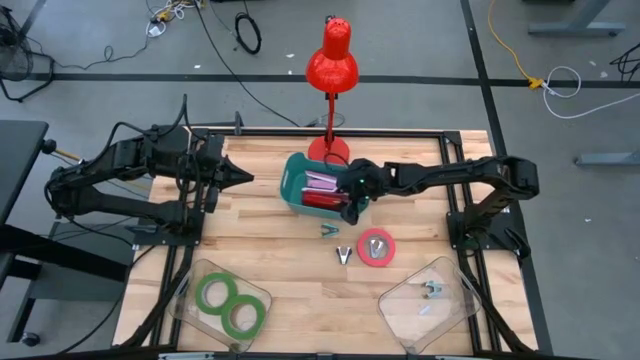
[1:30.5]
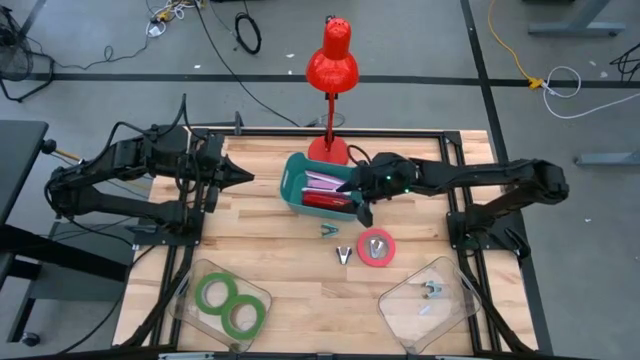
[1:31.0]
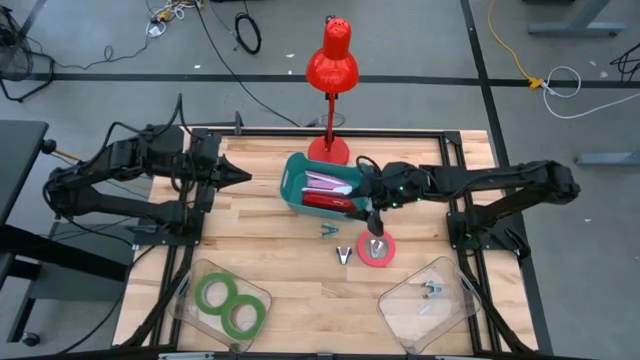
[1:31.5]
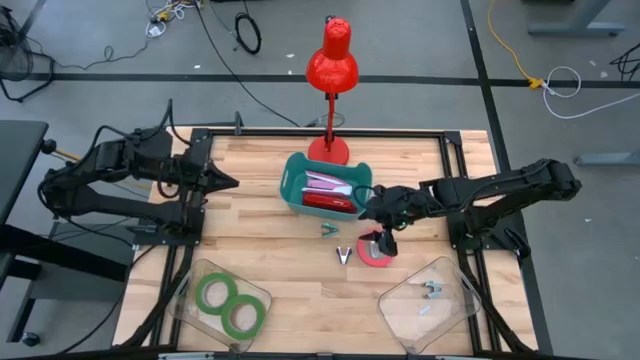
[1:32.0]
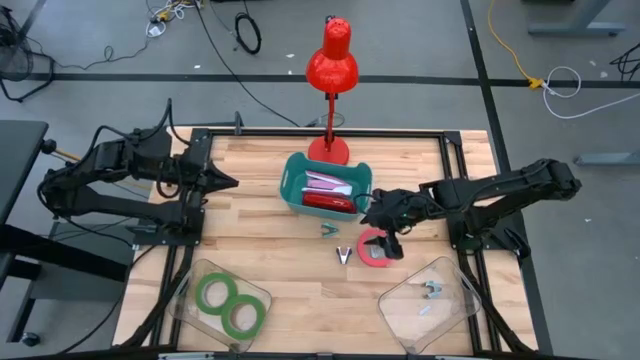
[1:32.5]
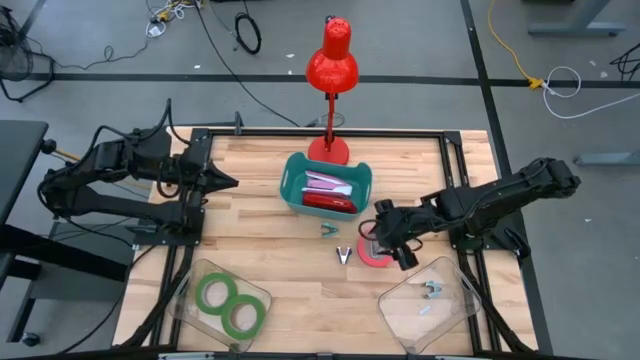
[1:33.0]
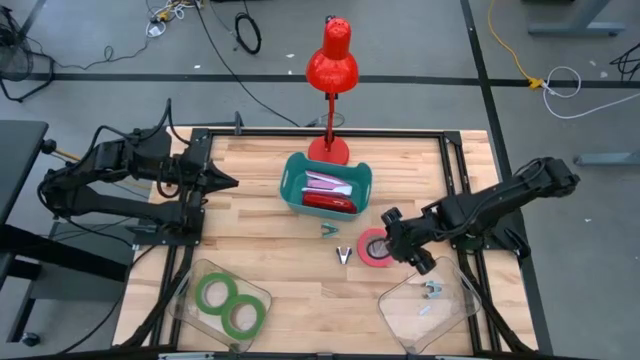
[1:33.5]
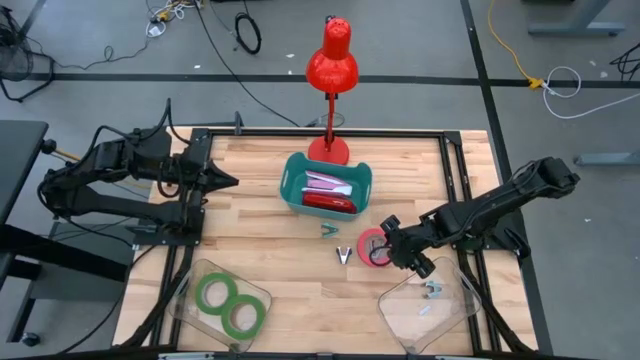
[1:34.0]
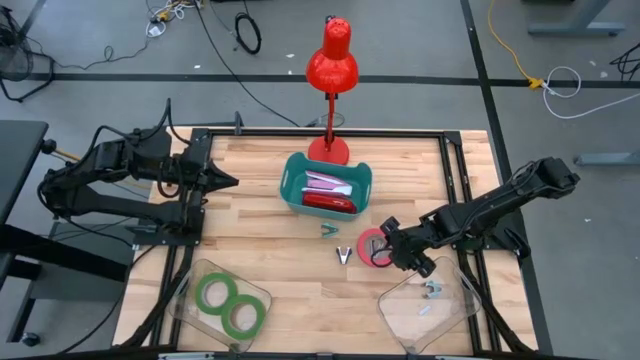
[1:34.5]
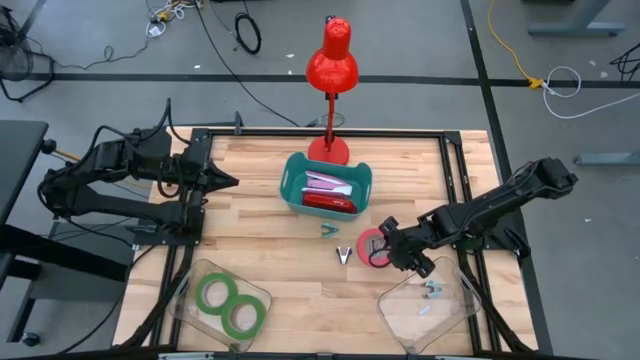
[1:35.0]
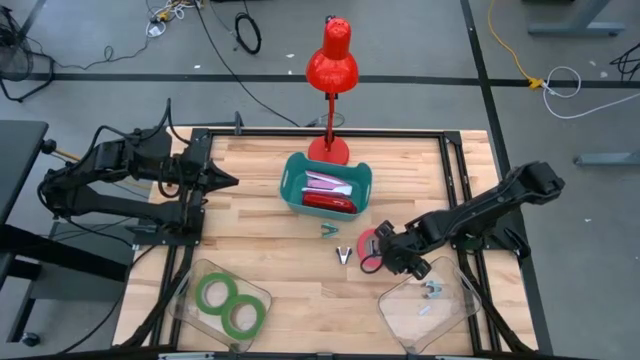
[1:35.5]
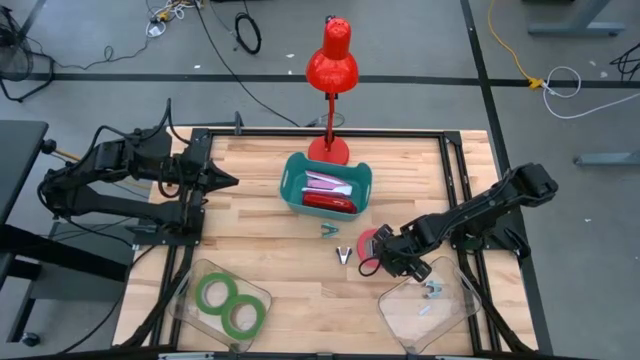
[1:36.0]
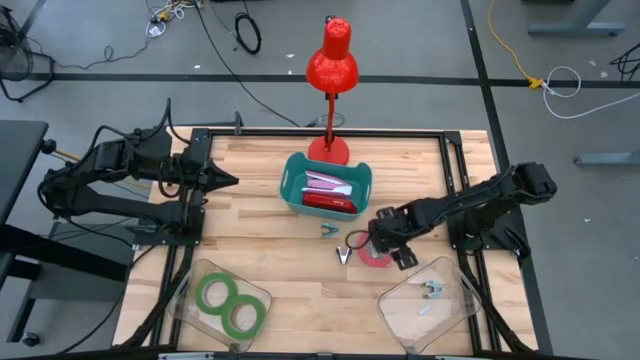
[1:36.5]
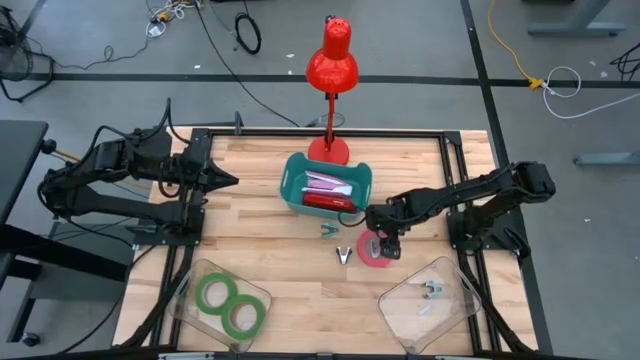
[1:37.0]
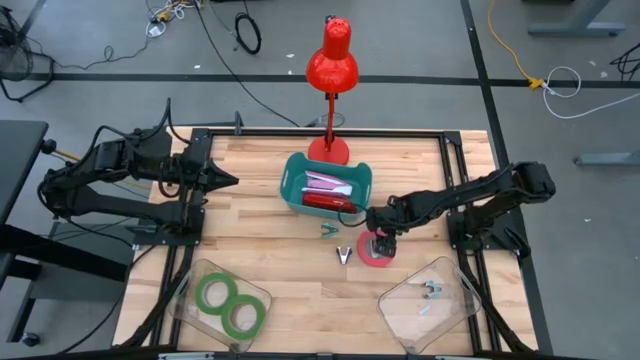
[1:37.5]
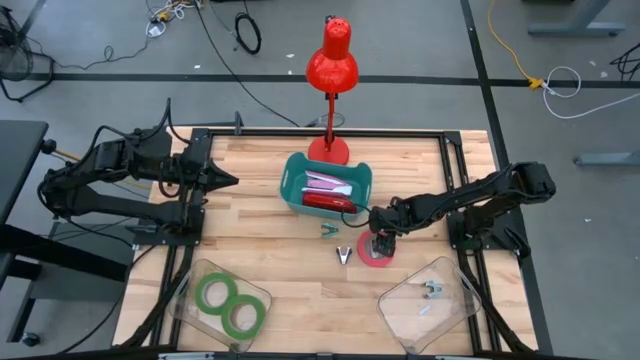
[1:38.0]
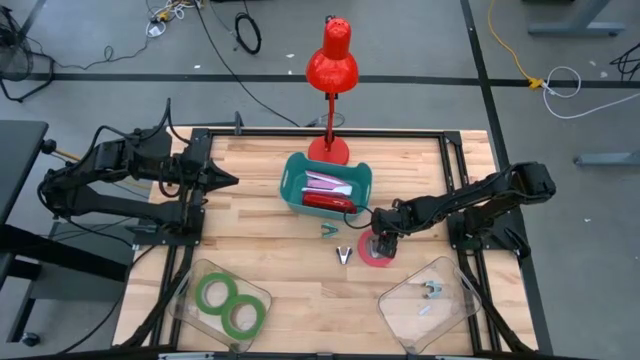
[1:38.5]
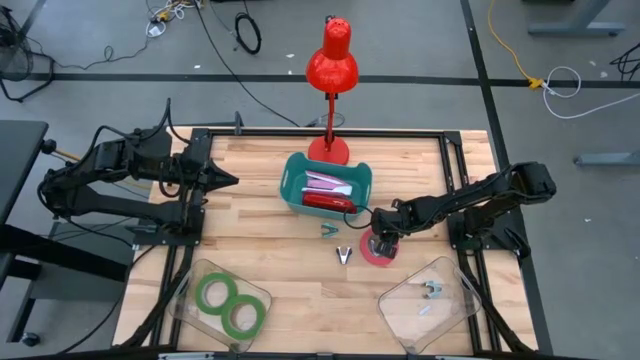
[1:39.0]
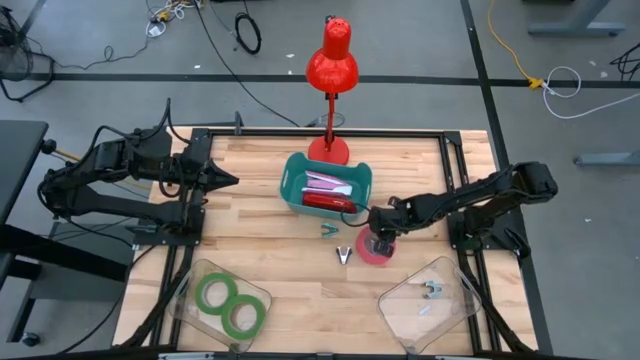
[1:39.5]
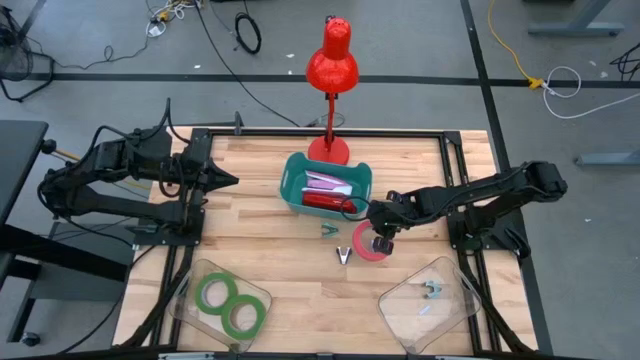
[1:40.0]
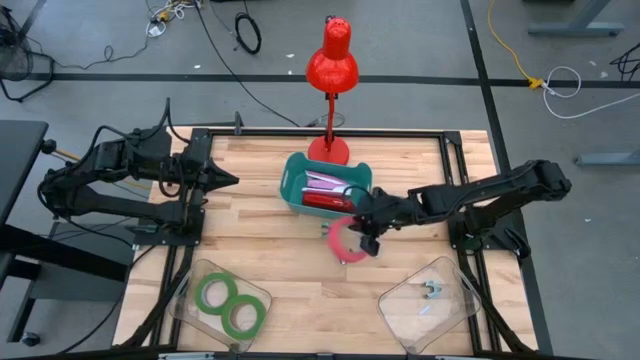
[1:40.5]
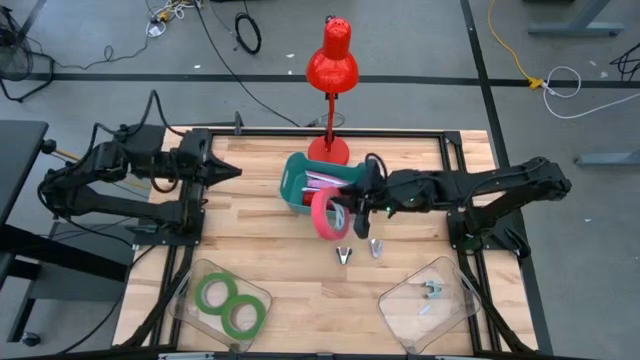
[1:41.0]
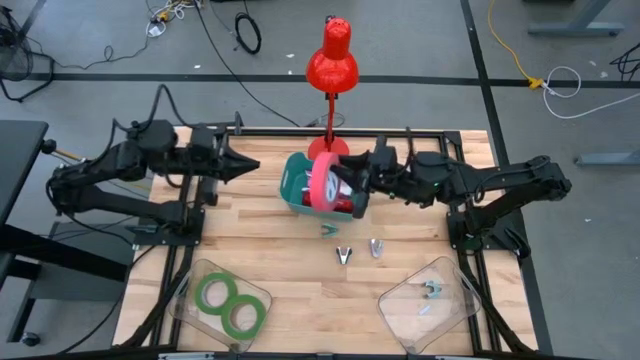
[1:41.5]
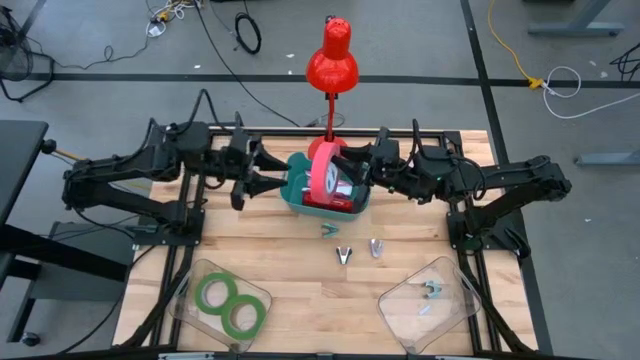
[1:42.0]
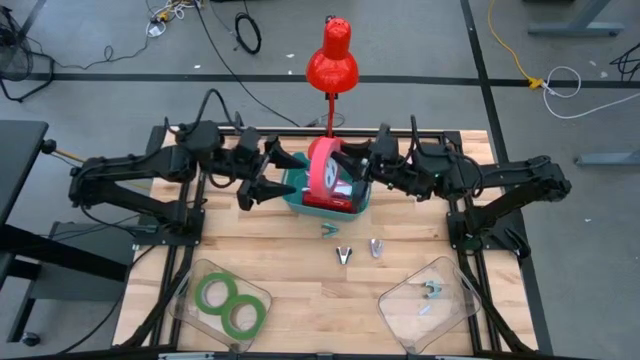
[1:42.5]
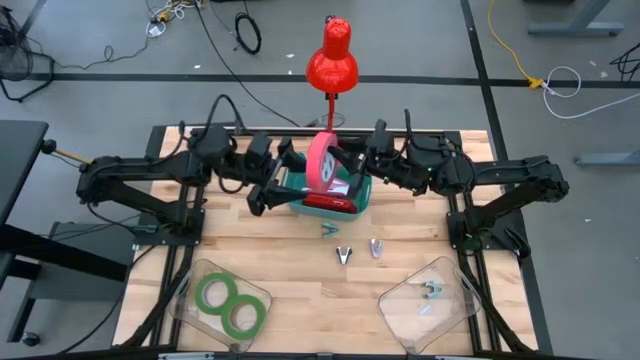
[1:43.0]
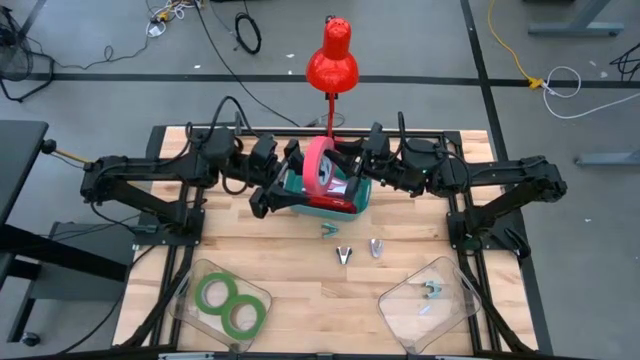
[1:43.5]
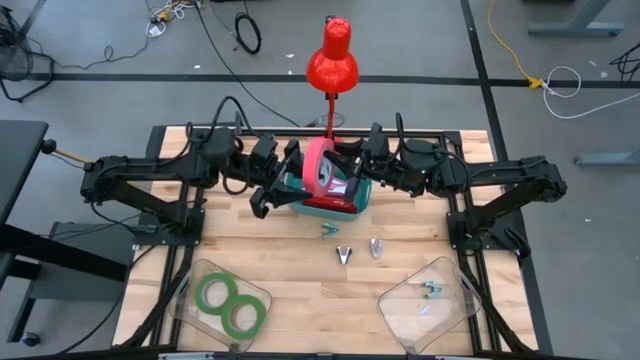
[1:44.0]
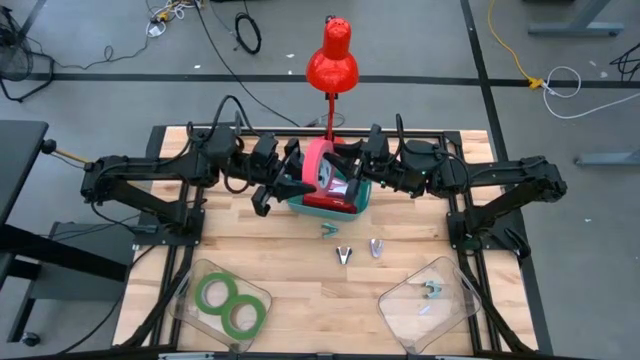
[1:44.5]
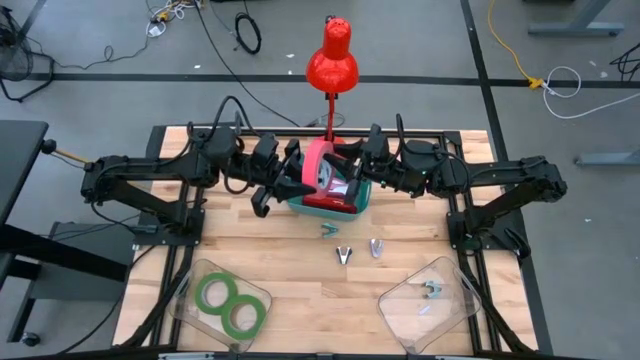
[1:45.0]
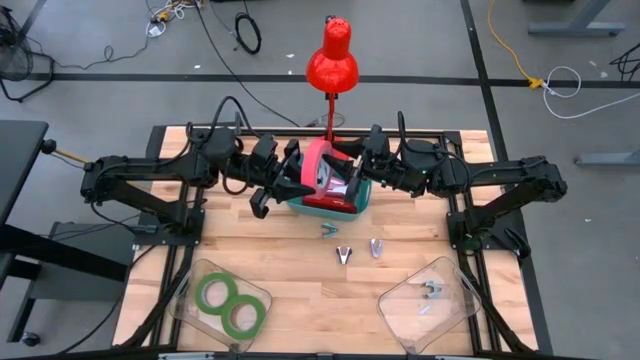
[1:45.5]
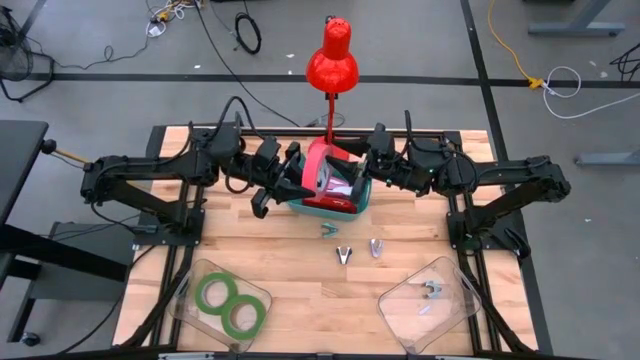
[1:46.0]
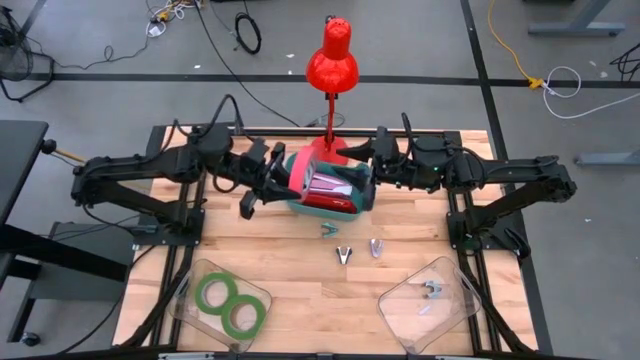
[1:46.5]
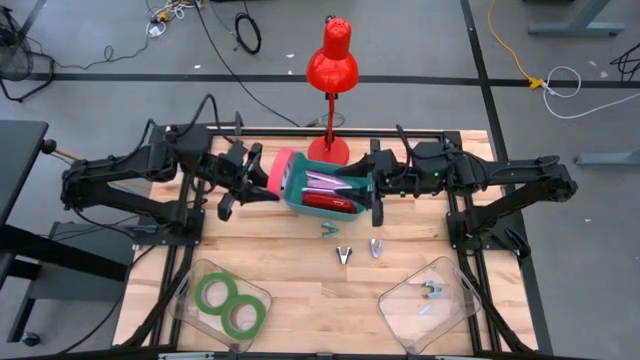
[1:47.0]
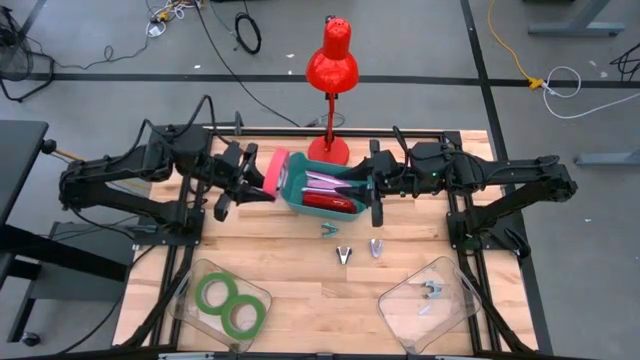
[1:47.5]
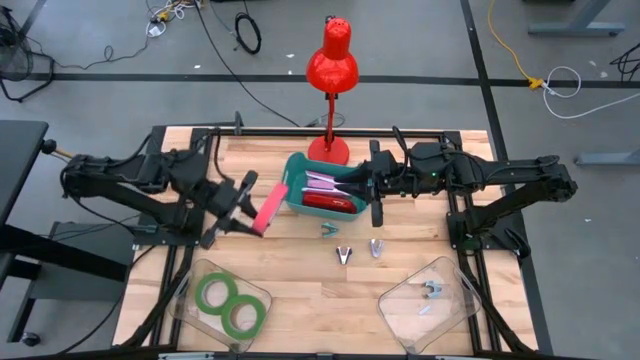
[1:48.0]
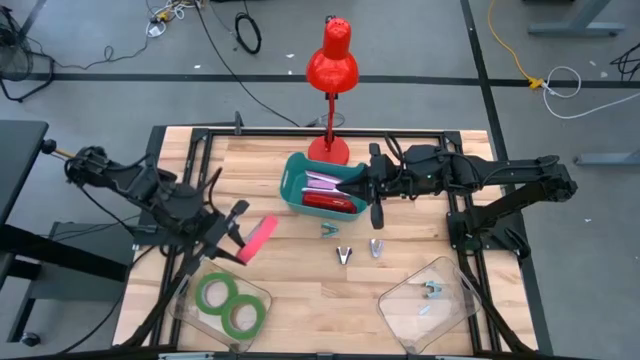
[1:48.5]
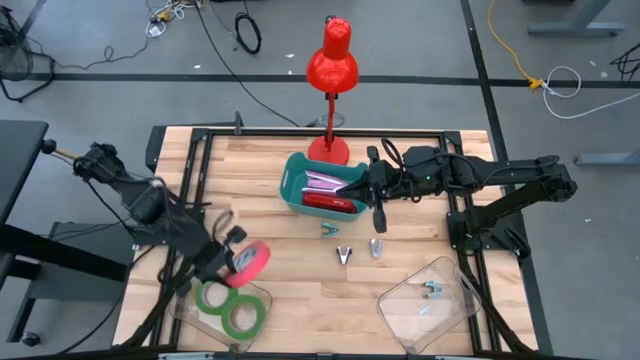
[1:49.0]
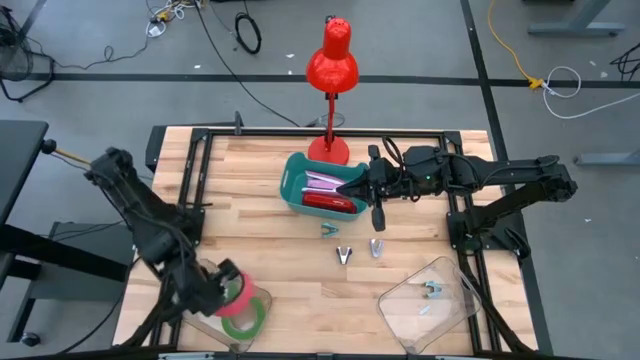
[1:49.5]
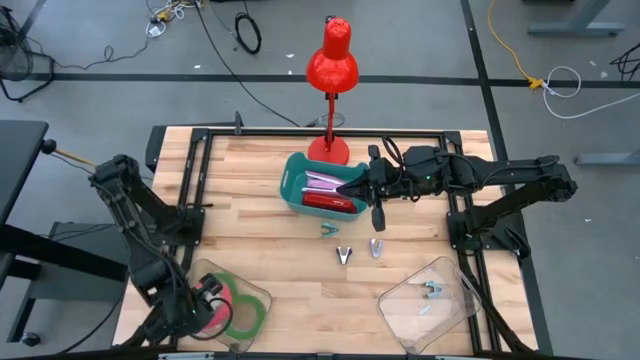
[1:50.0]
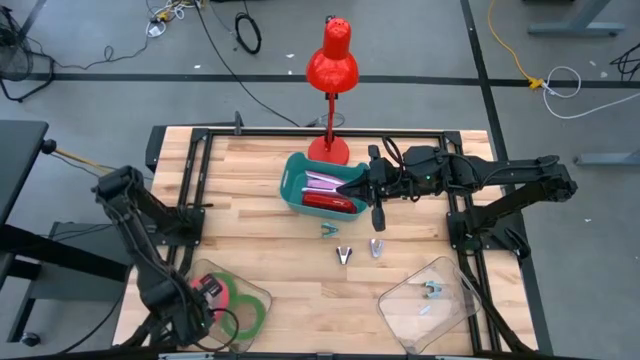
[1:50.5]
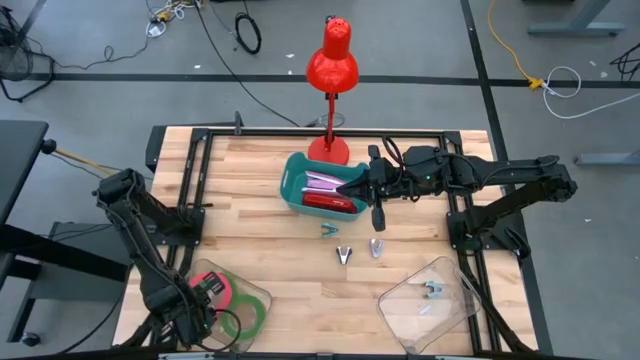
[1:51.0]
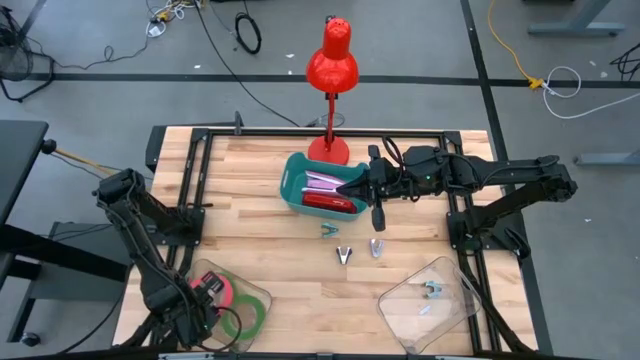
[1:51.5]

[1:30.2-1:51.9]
Task: Pick and place Stapler, Stapler remover, tape
Put the pink tape in the left transparent bin
